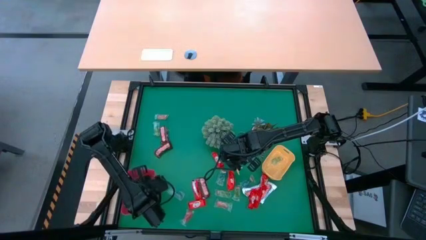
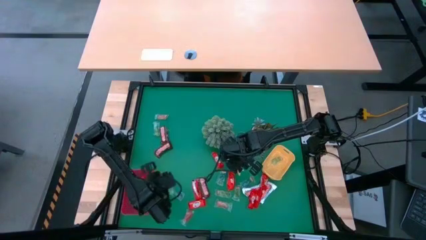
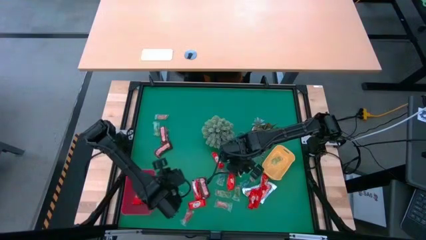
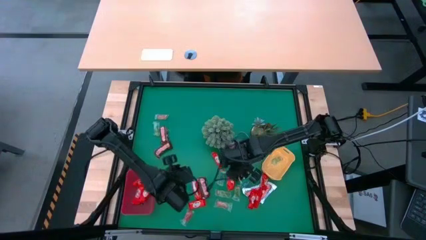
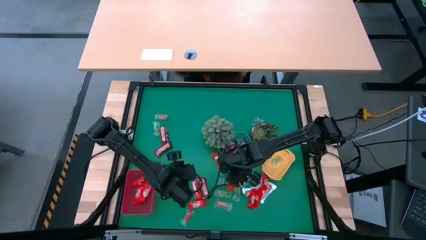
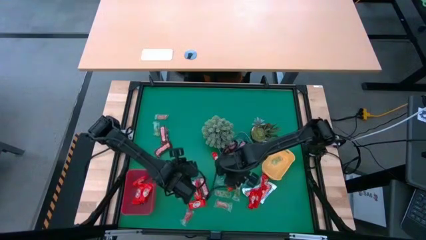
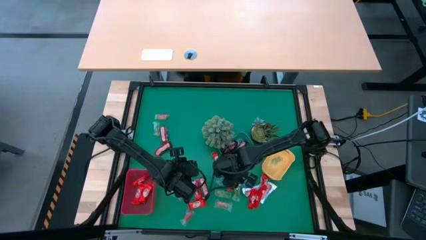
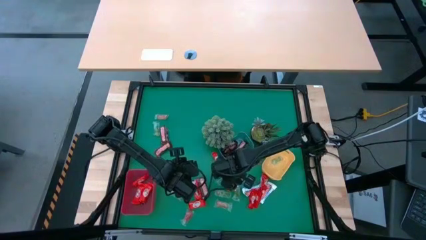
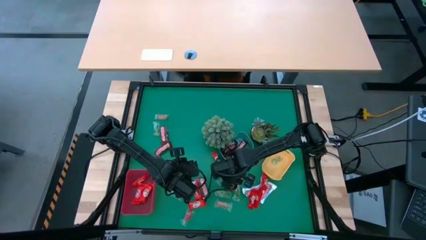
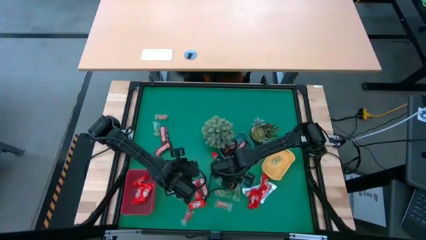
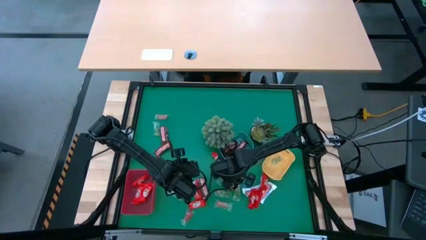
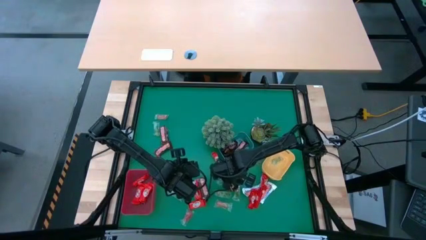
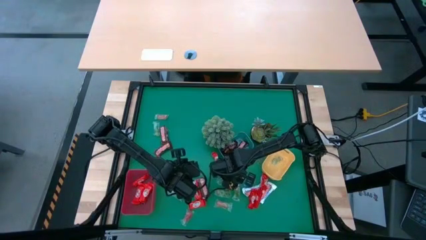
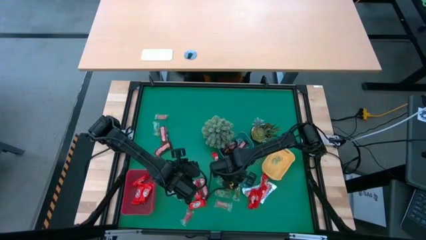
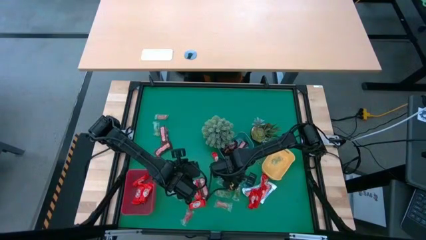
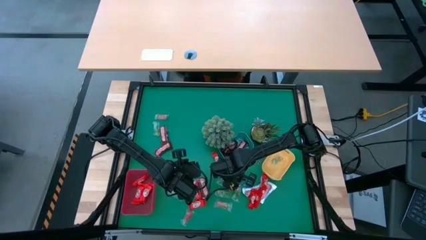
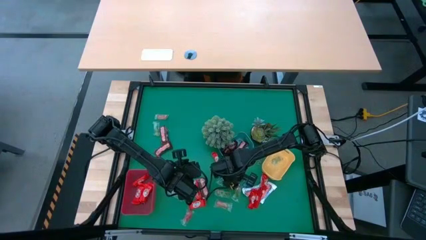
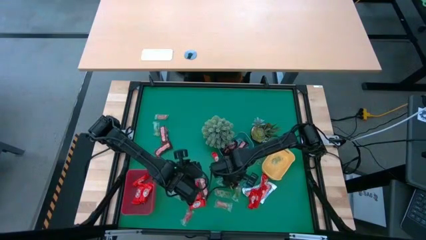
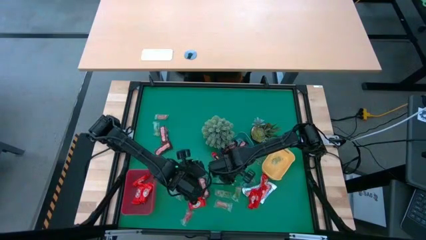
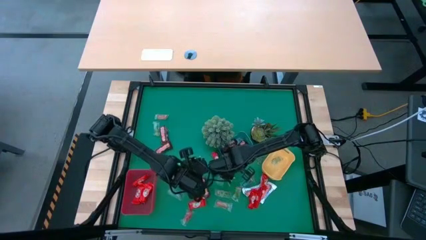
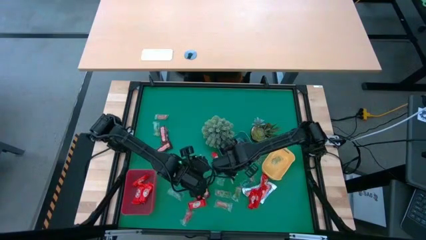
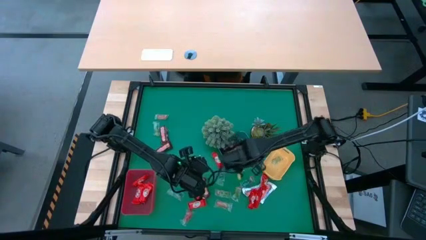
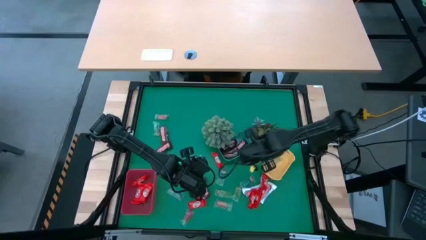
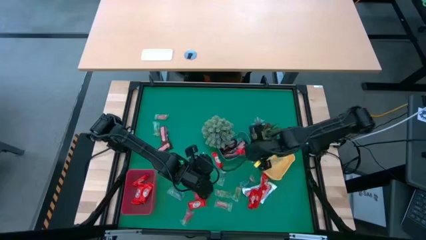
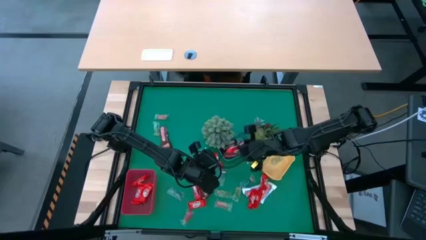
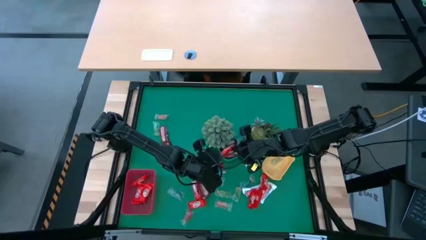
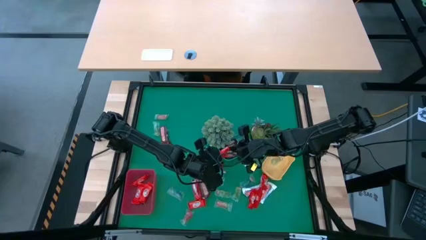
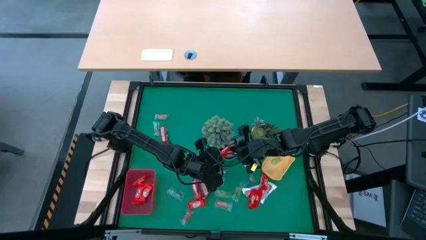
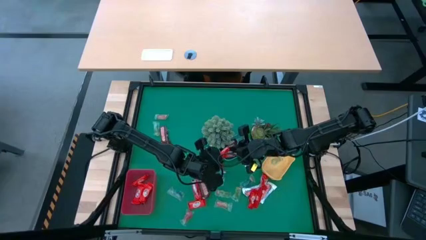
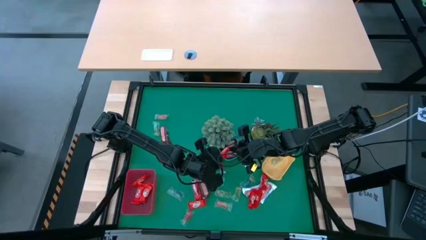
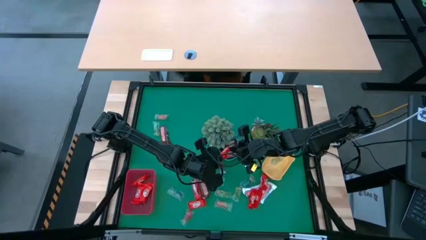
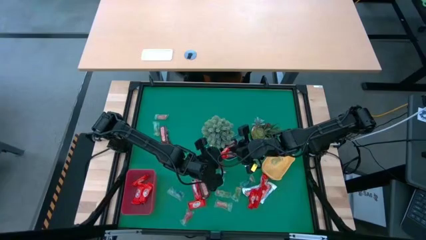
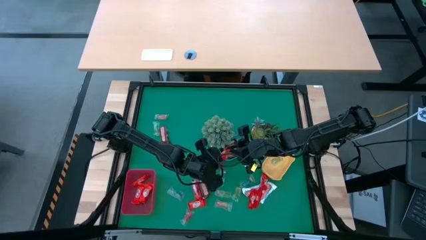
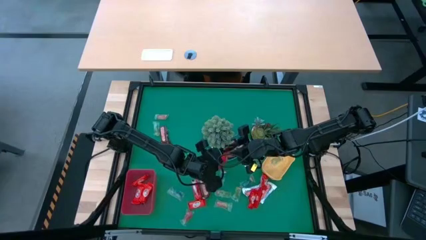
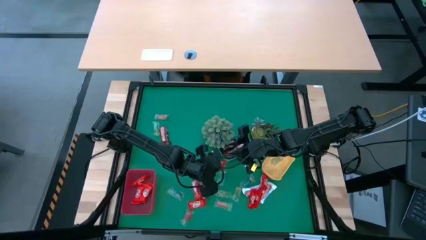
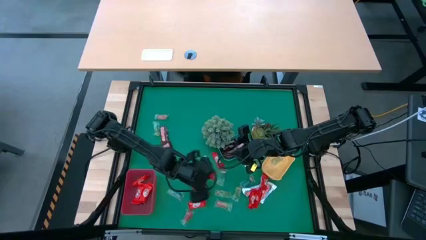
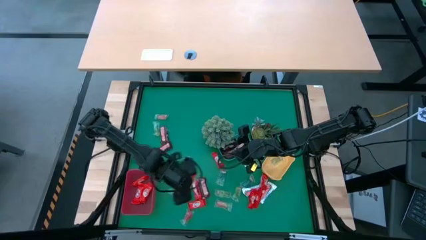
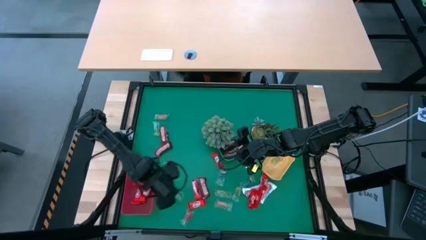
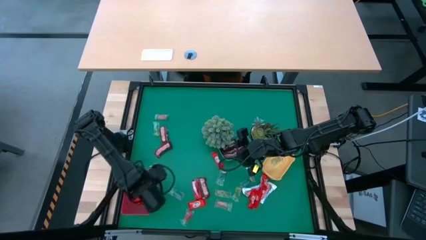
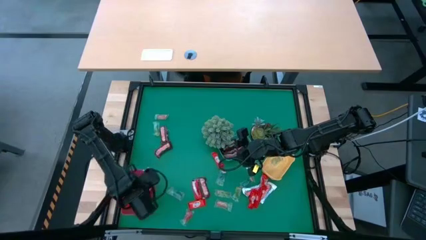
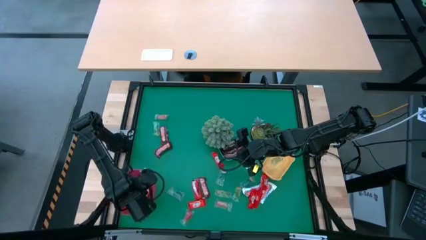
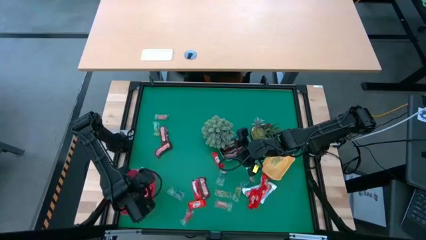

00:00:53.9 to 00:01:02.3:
Task: Organize candy in baskets
Put the red chocolate into the red bin

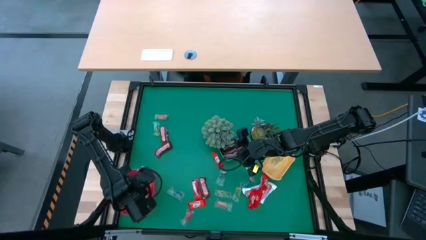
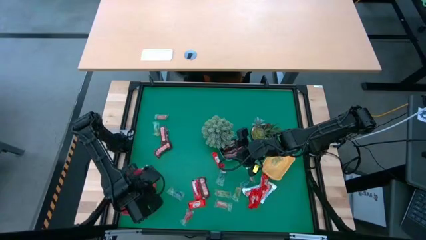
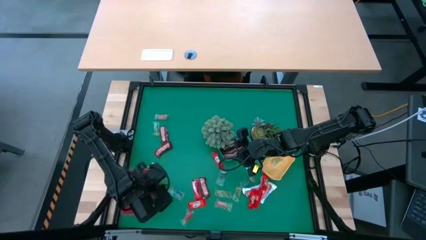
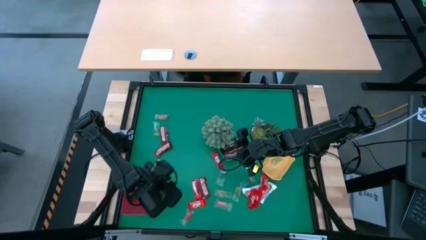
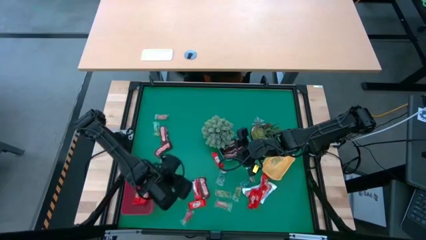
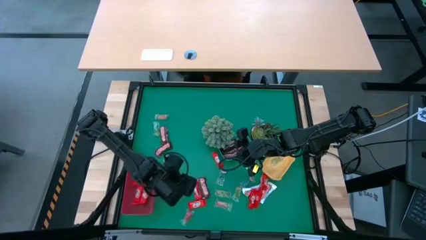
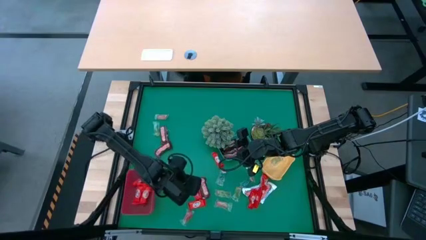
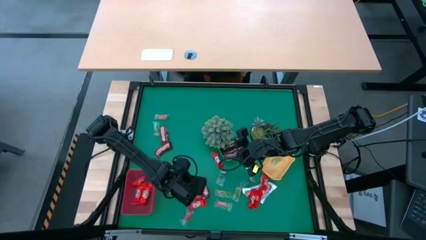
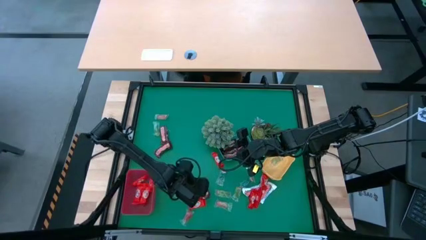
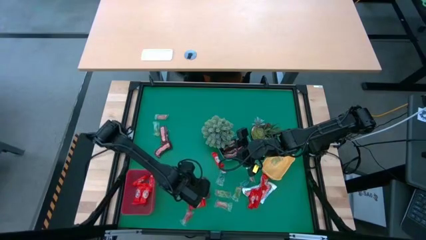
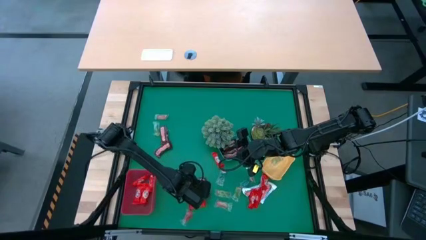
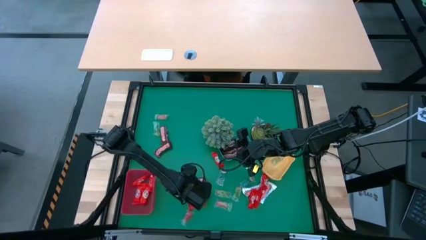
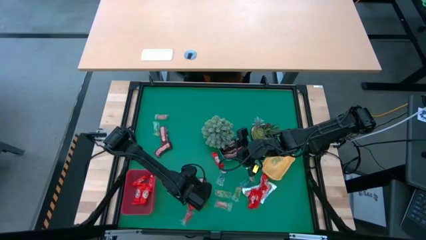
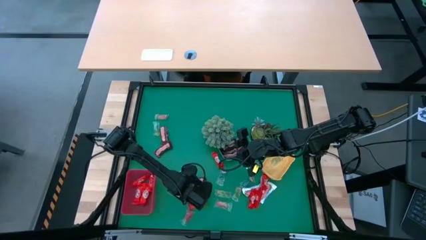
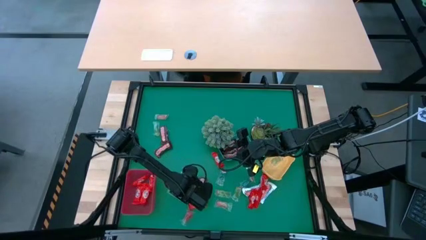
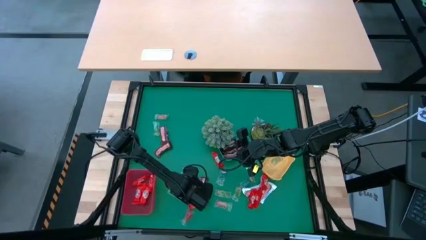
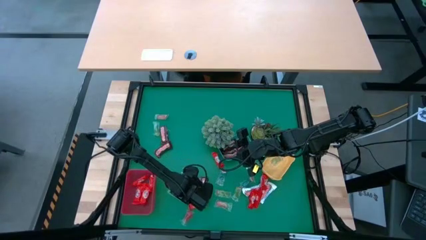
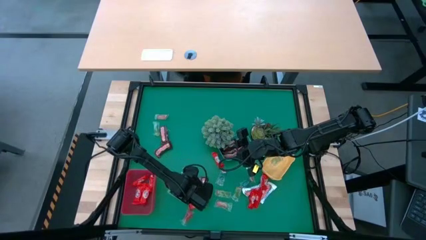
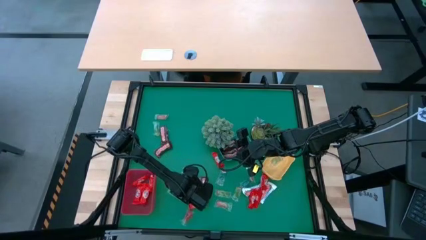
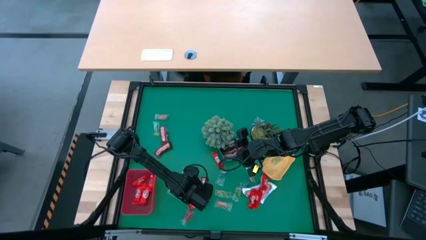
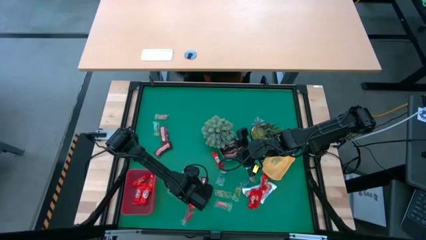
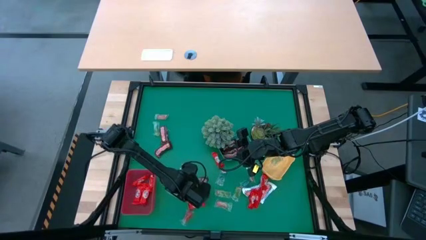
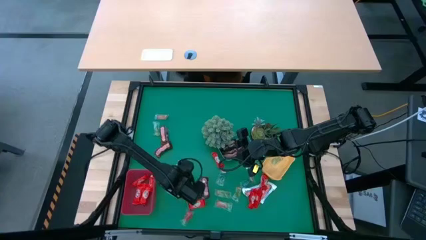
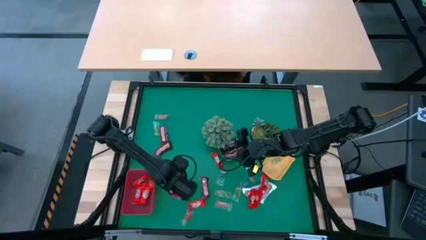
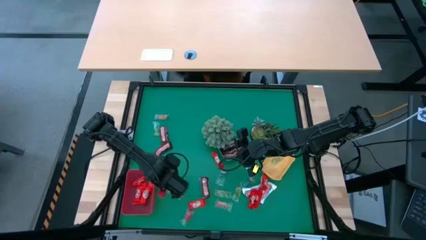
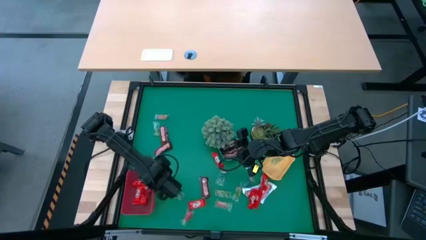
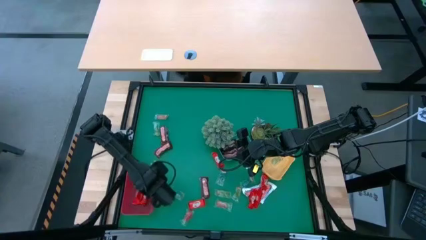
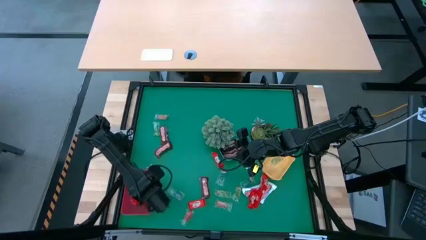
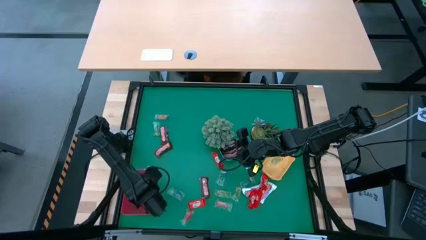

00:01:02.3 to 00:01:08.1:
Put the red chocolate into the red bin

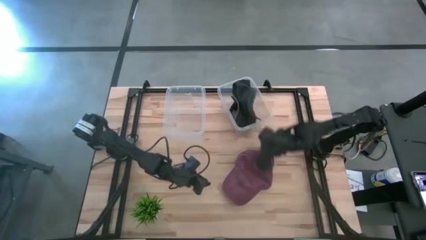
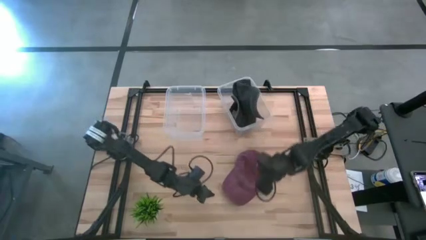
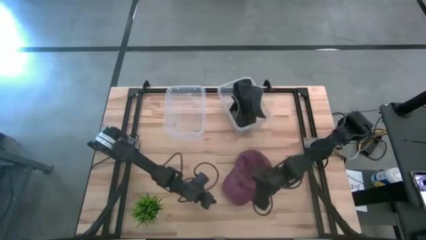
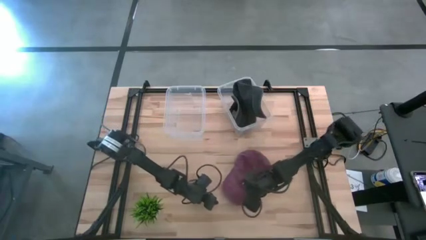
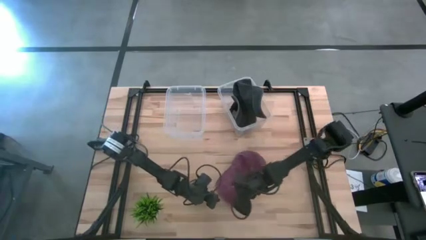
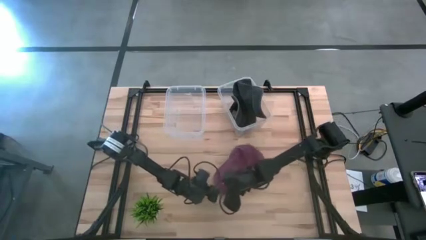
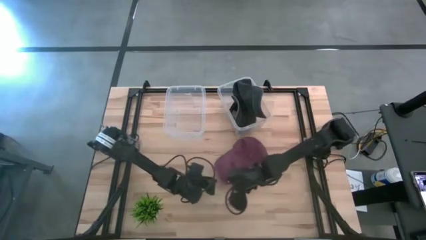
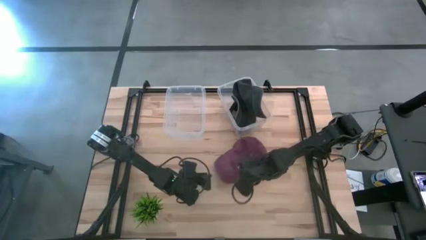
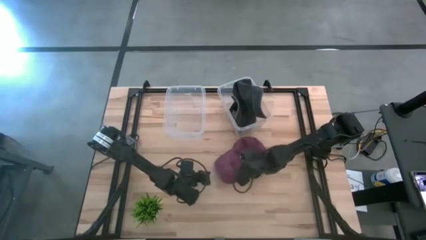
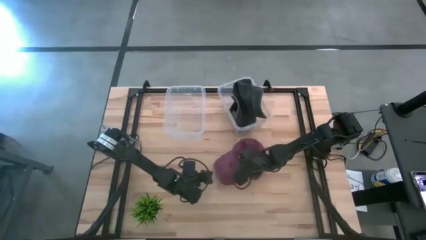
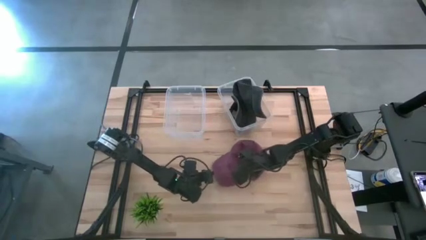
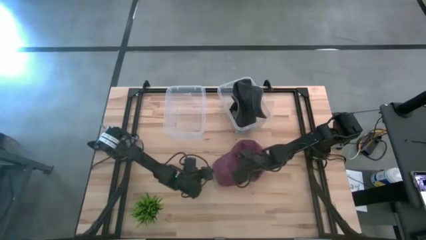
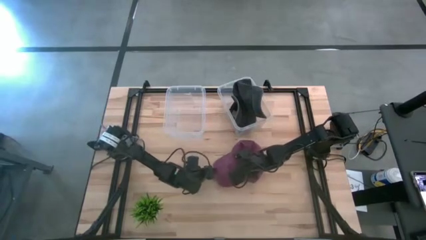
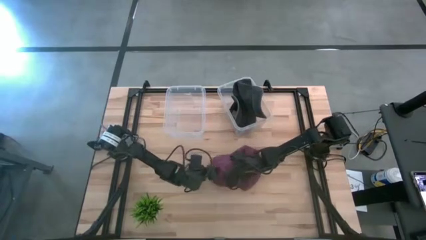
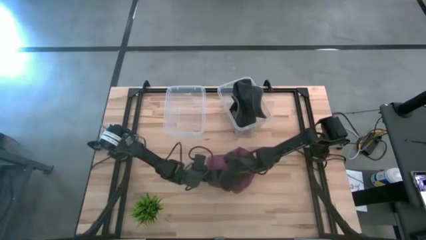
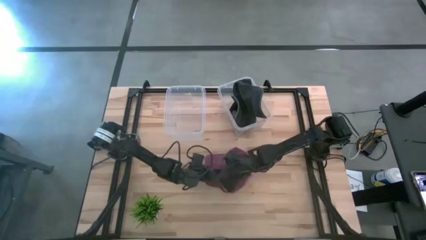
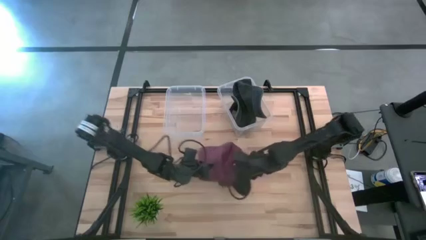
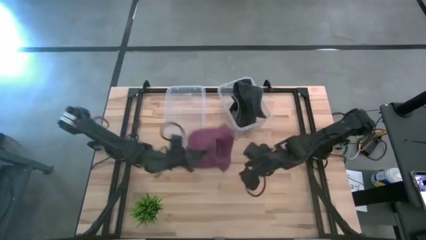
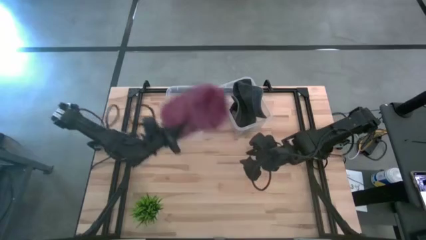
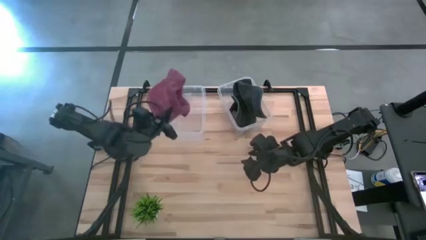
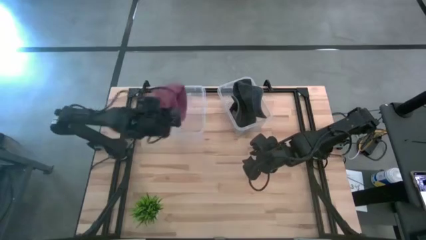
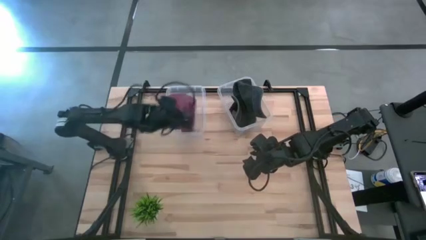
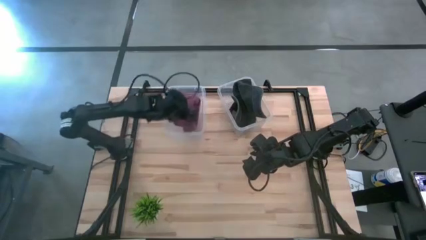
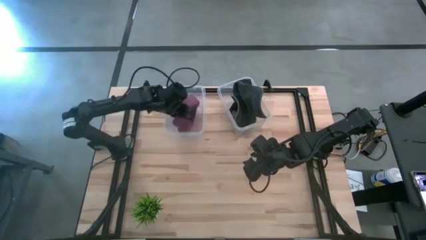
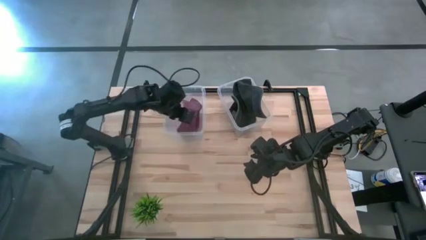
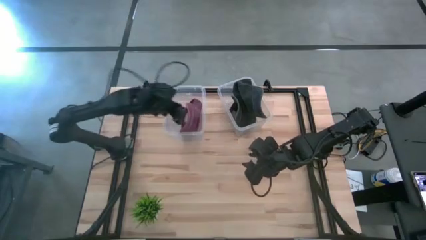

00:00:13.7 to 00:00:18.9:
Task: Pick & Place hat
Put the red cap into the left transparent bin
